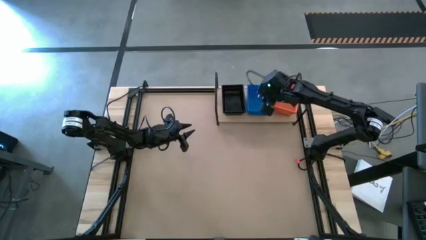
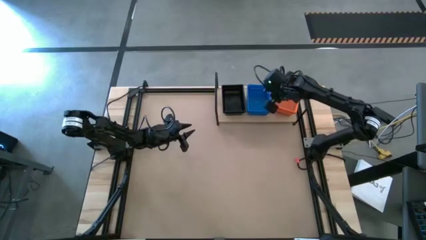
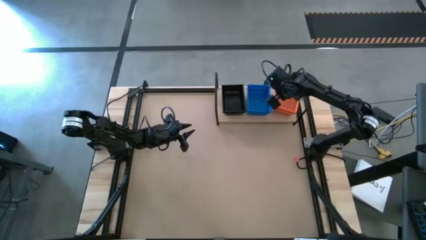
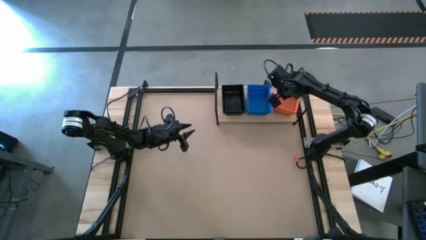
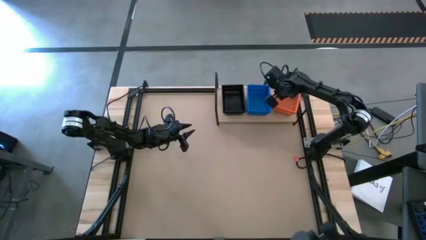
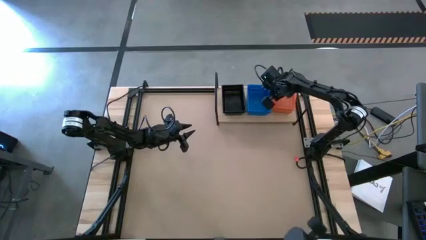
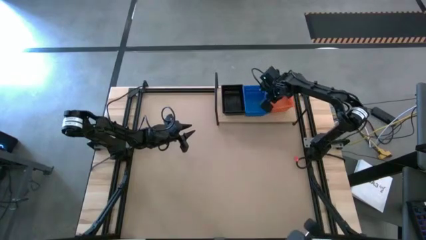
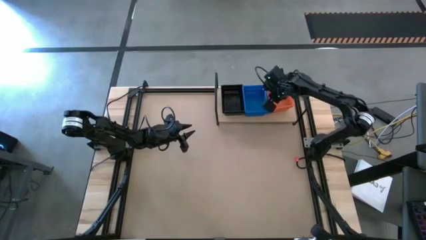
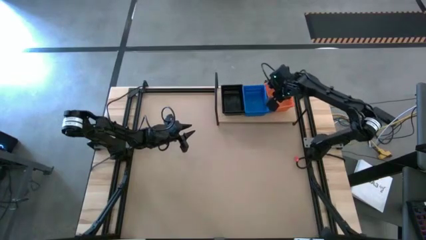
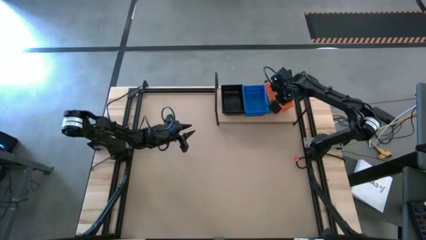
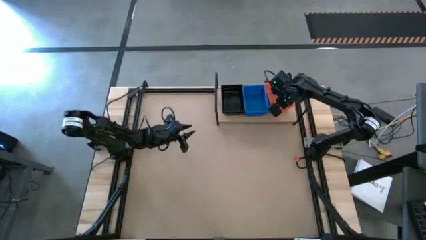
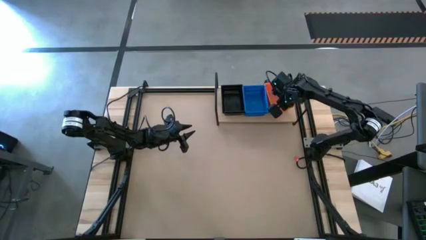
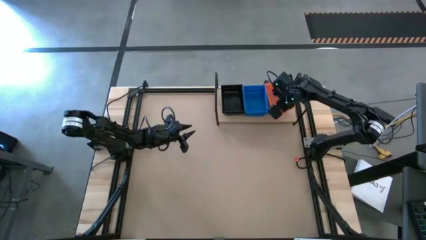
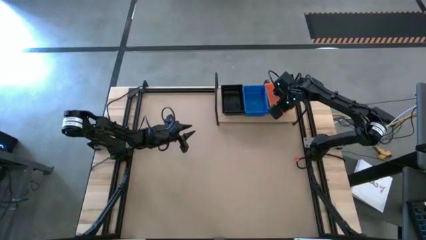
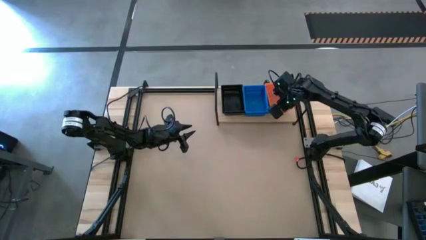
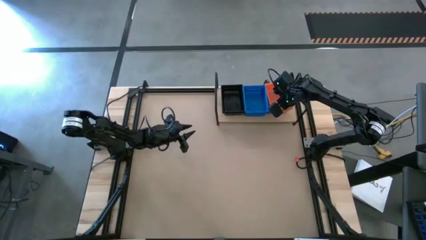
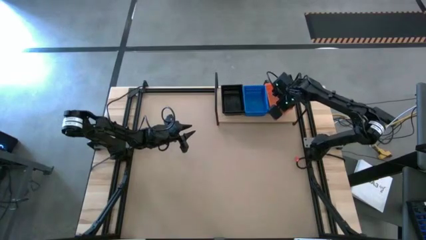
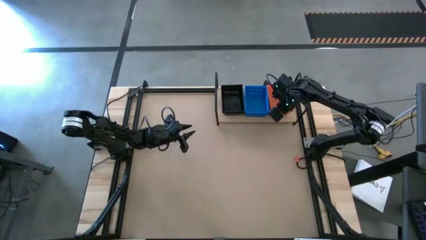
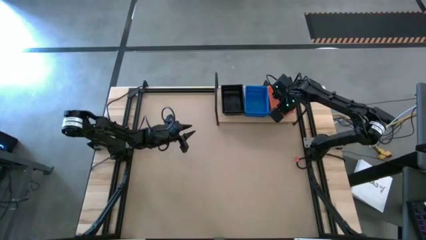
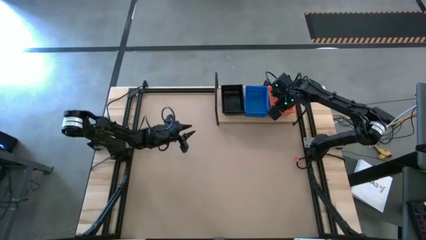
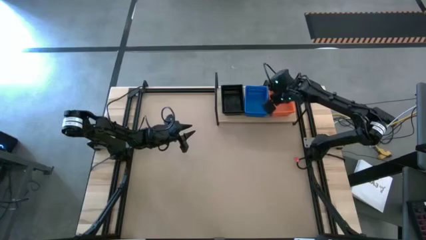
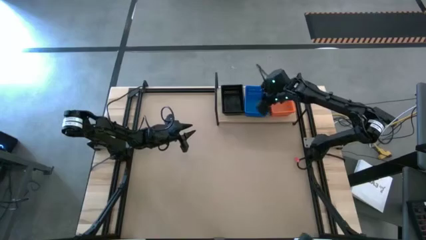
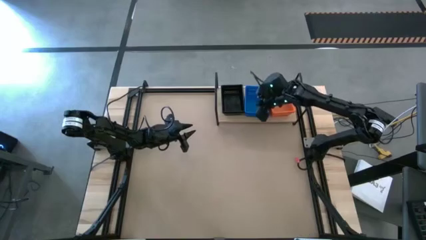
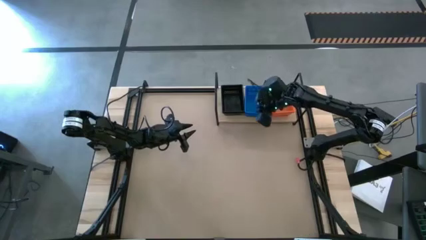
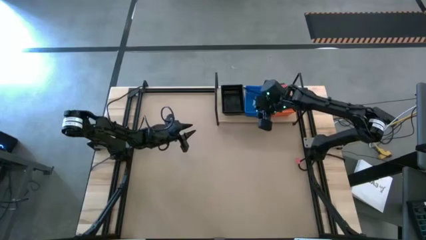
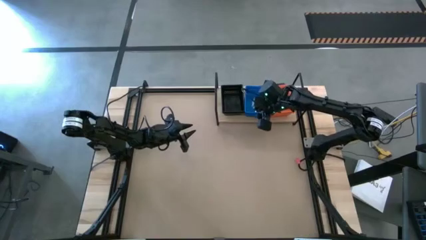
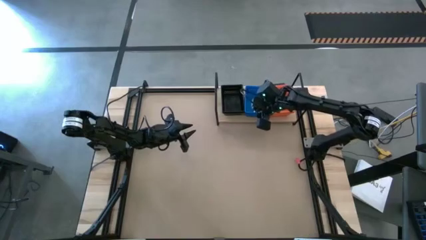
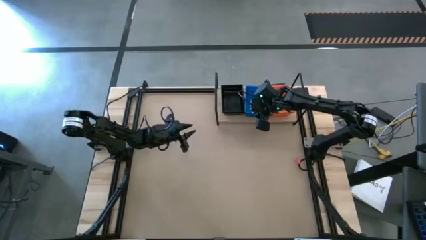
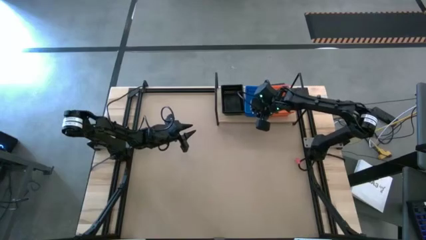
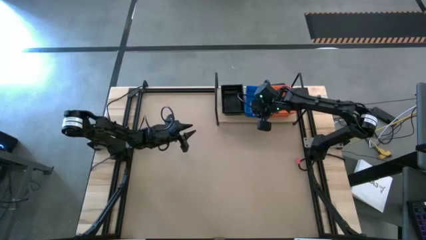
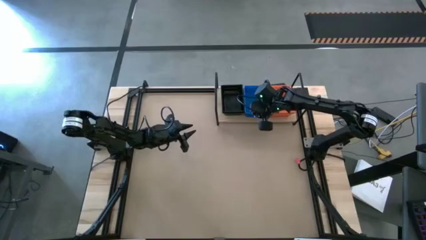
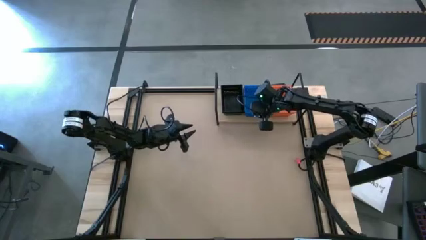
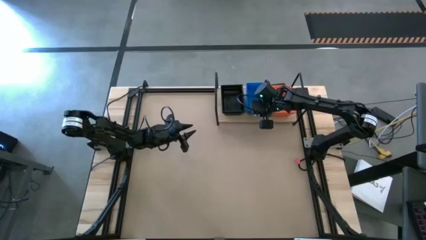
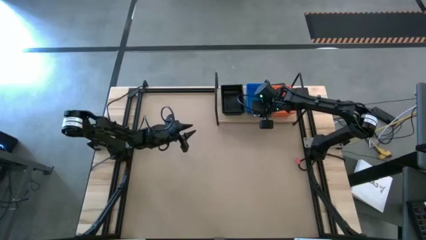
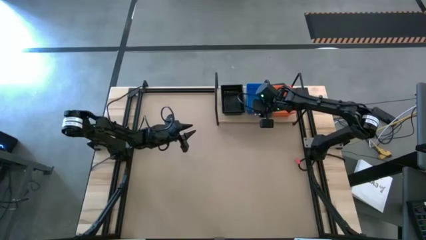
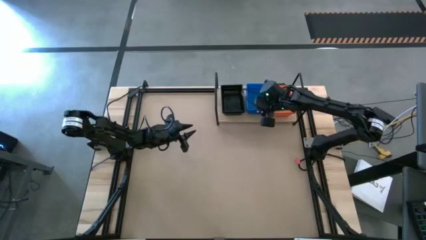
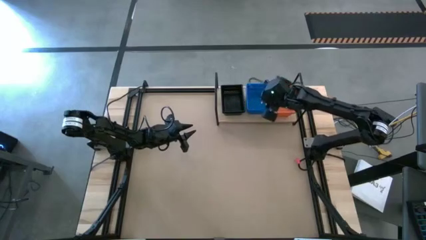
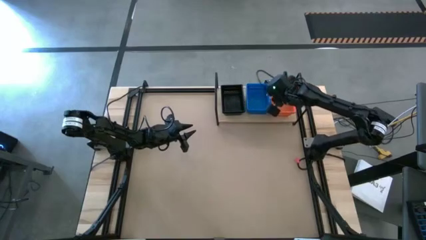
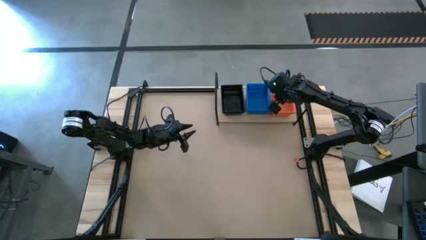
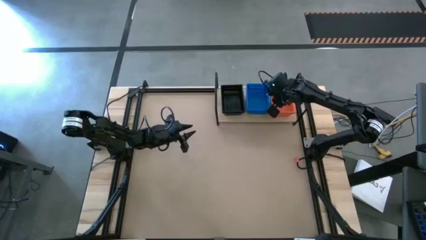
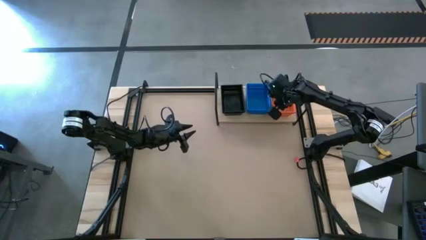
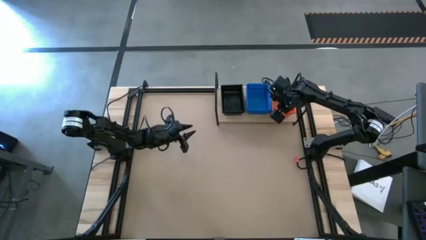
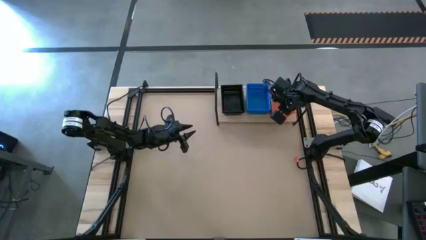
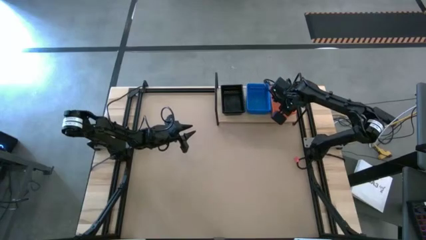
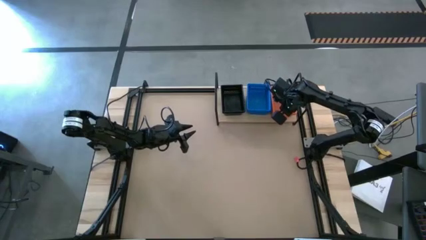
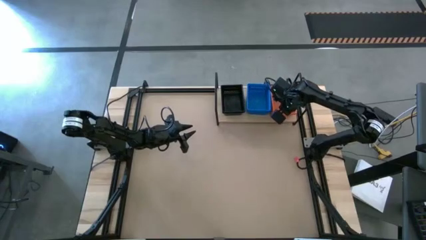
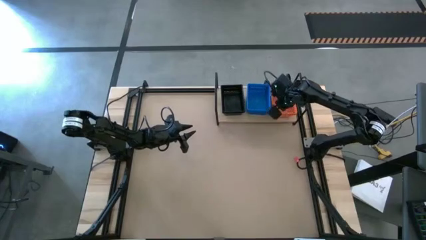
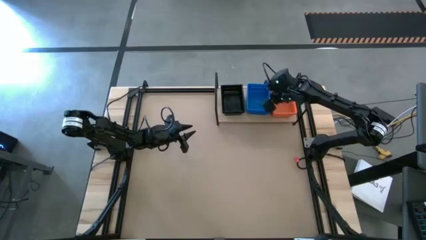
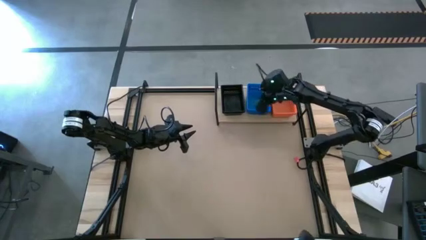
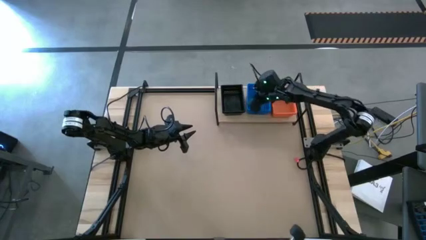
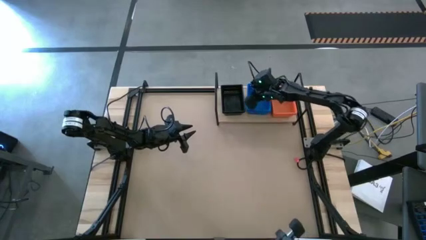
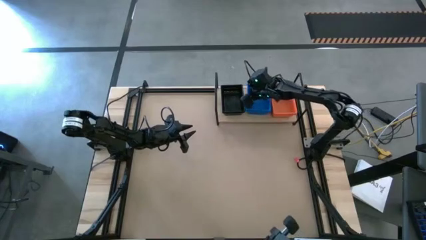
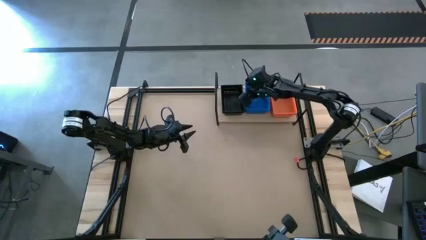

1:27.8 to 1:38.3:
Task: Stack baskets on shelf by color
Adjust the bins on the shelf

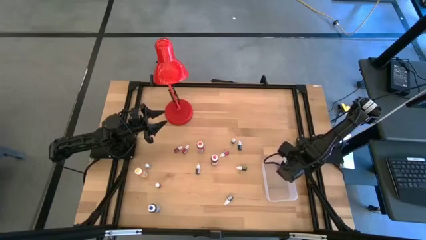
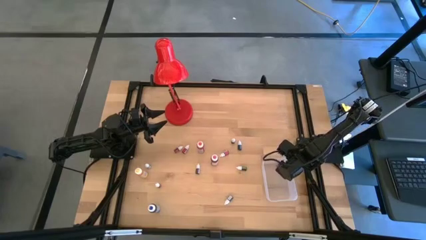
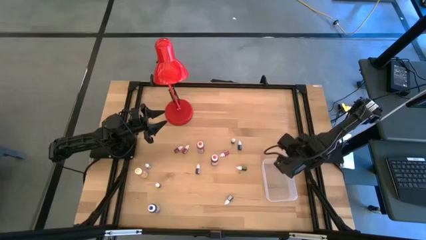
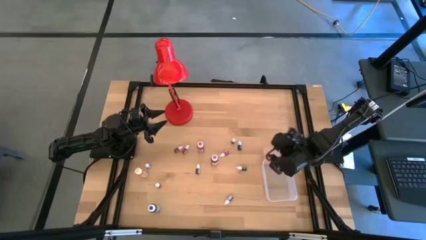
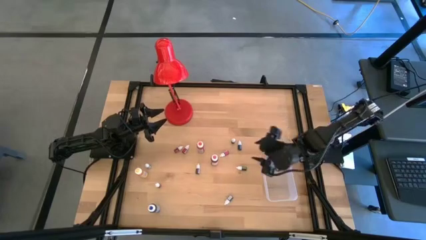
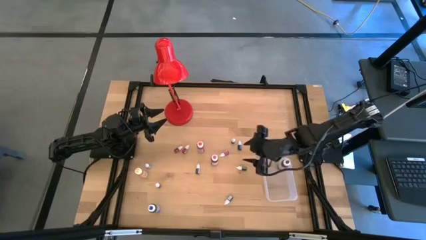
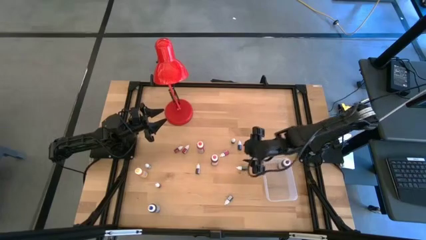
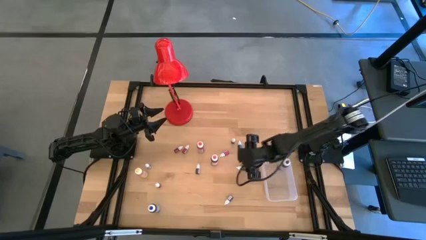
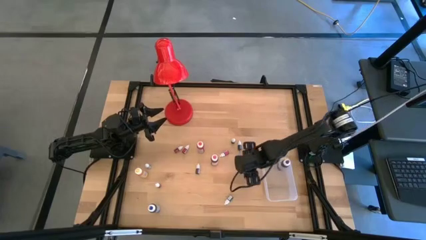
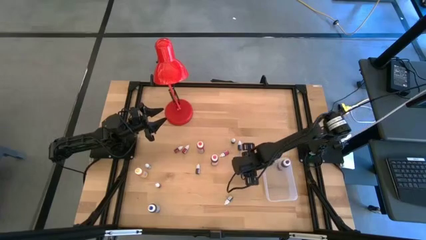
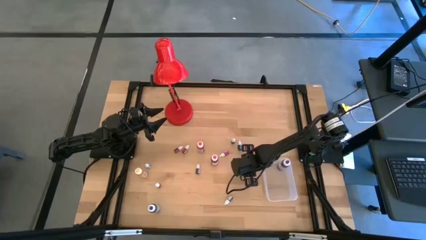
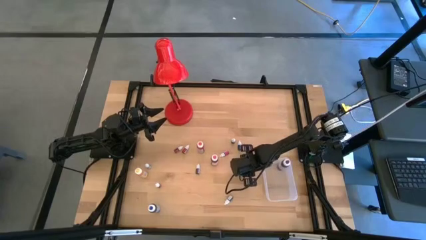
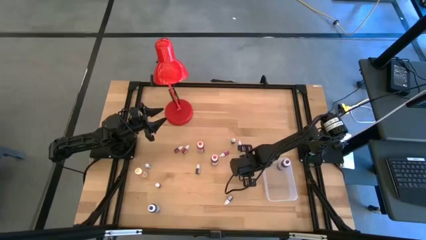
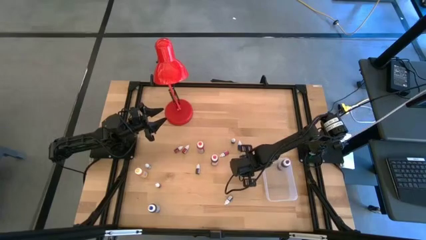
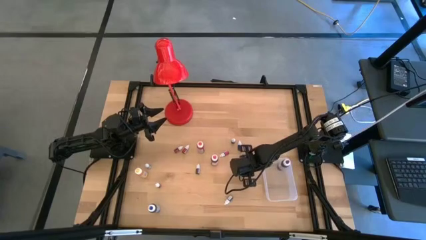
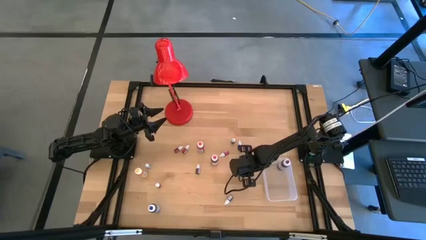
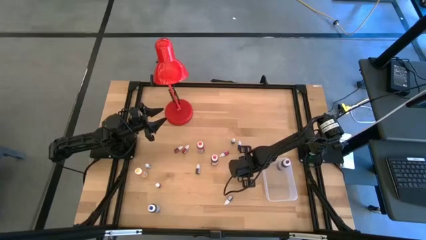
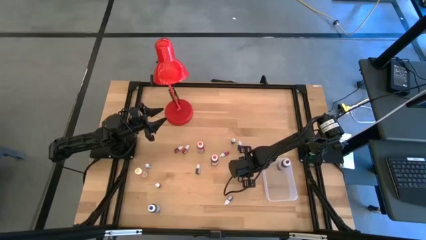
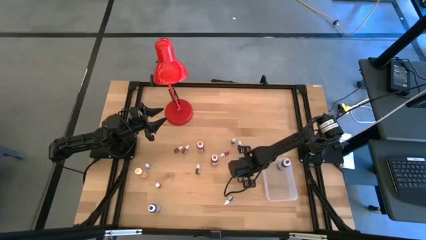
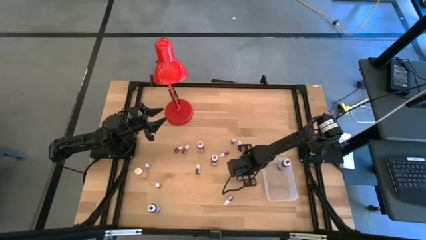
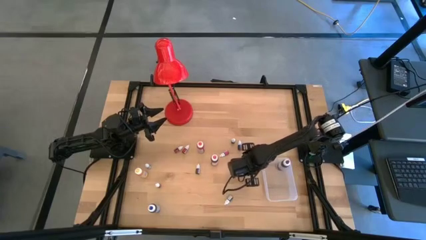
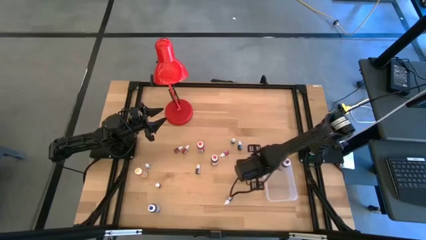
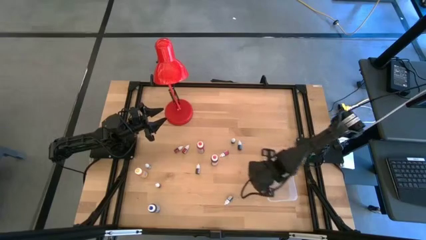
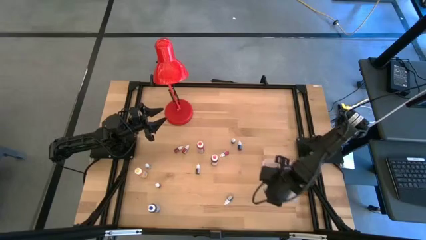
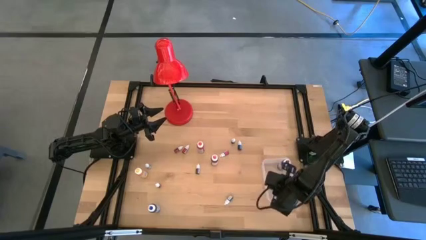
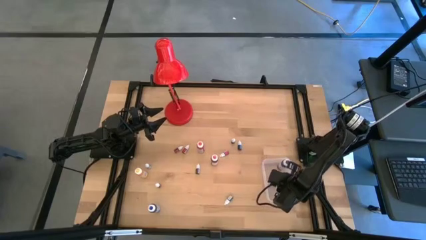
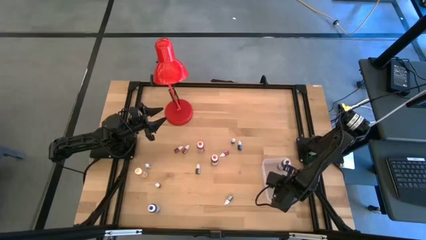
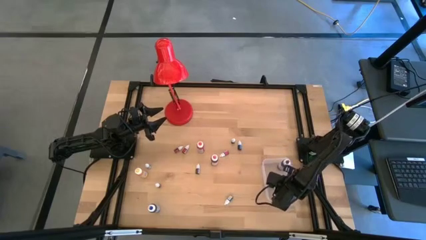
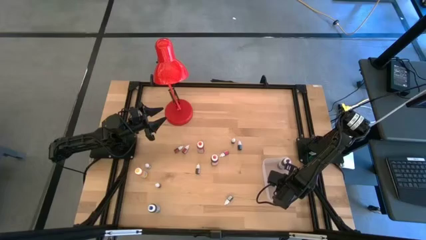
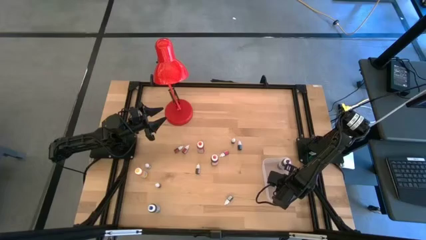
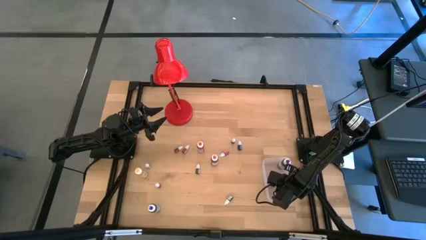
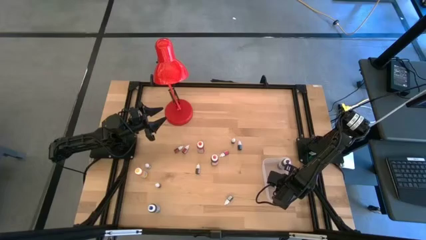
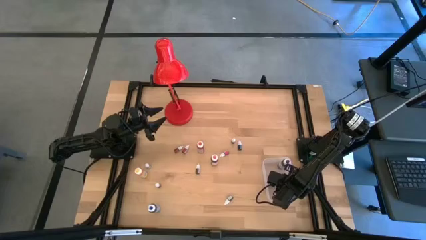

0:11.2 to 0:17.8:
Task: Pick & Place food coloring
Put the top small green bottle into the transparent container
